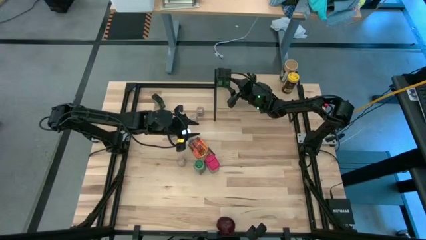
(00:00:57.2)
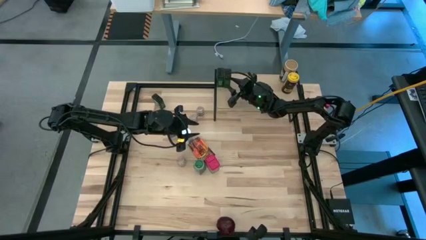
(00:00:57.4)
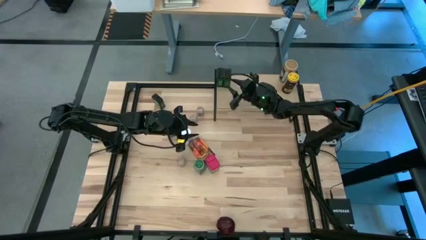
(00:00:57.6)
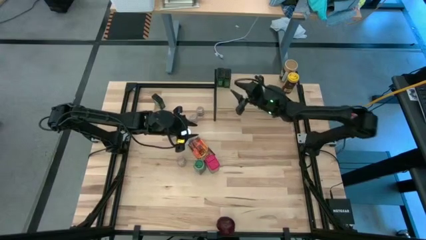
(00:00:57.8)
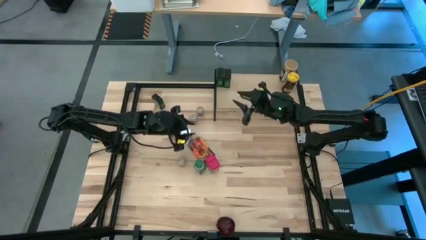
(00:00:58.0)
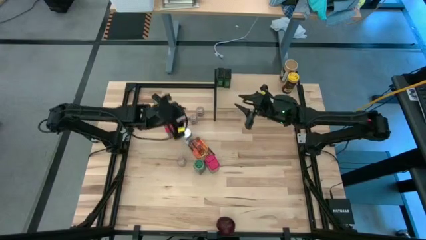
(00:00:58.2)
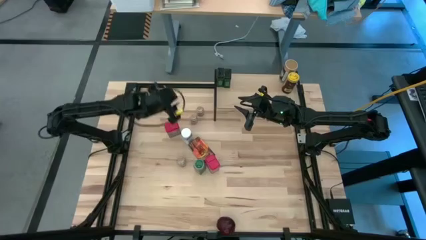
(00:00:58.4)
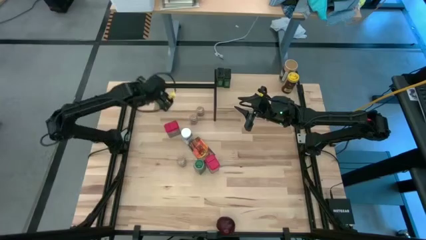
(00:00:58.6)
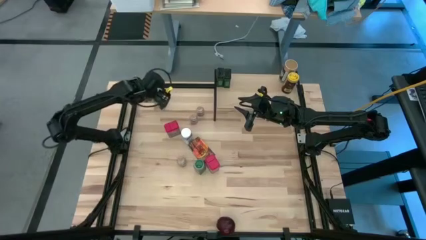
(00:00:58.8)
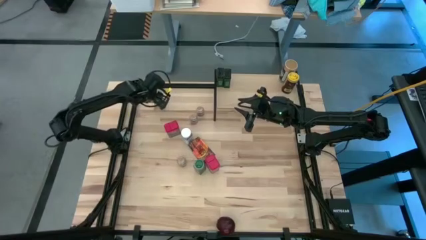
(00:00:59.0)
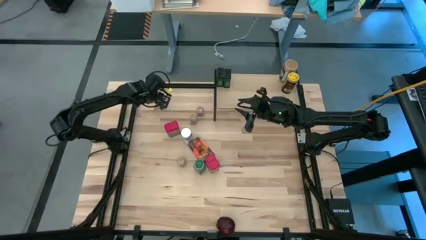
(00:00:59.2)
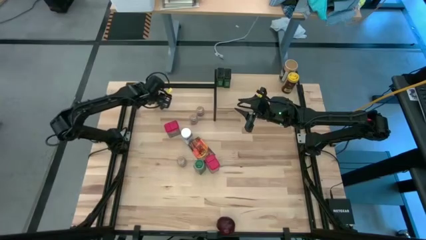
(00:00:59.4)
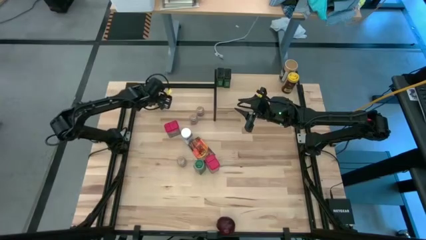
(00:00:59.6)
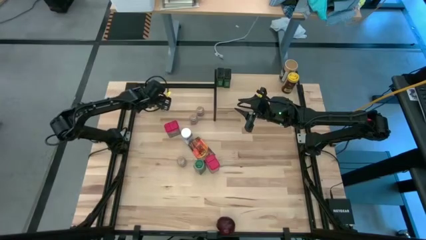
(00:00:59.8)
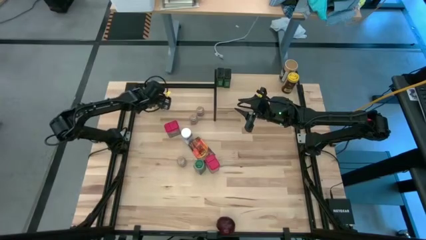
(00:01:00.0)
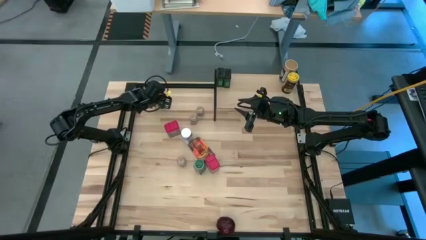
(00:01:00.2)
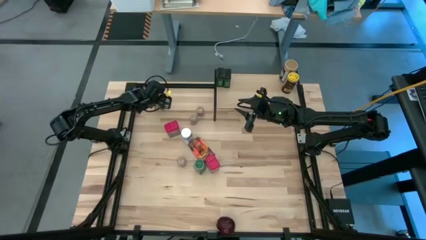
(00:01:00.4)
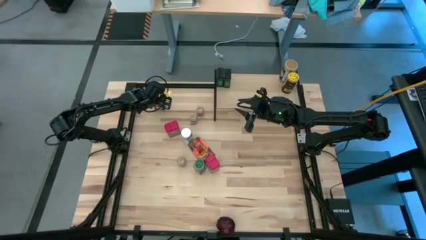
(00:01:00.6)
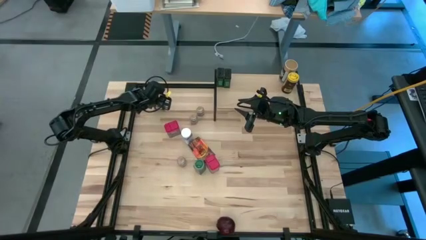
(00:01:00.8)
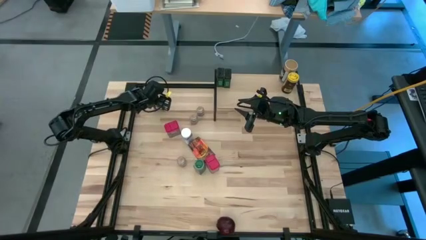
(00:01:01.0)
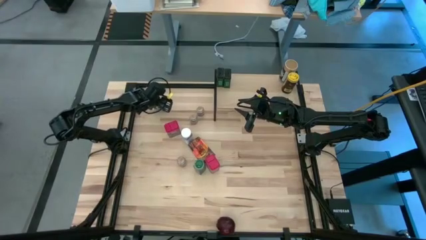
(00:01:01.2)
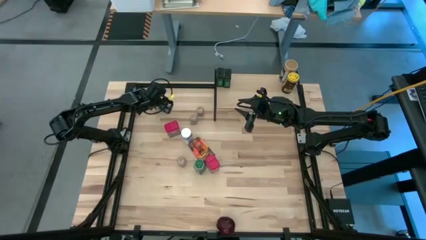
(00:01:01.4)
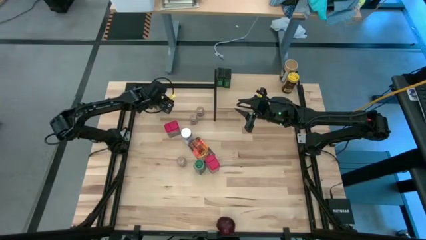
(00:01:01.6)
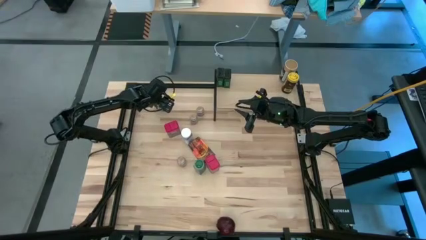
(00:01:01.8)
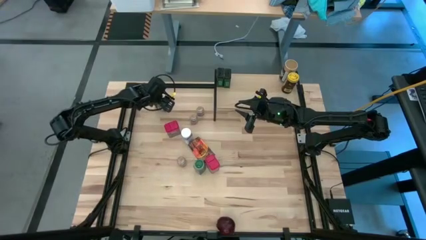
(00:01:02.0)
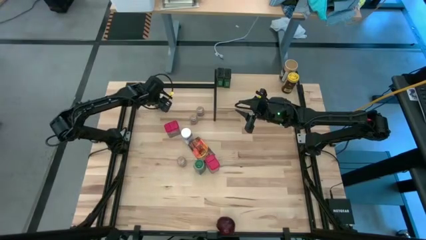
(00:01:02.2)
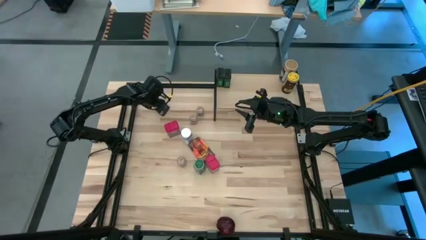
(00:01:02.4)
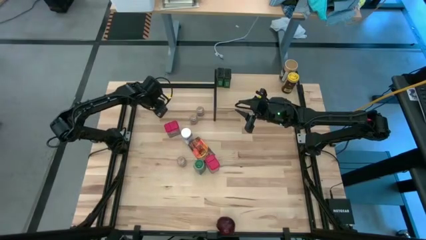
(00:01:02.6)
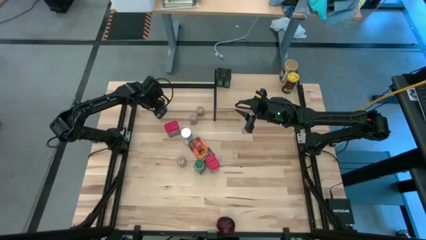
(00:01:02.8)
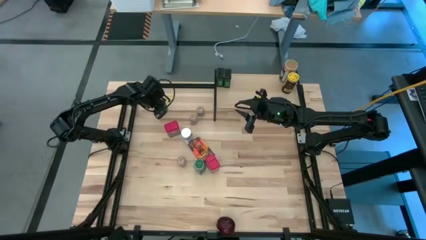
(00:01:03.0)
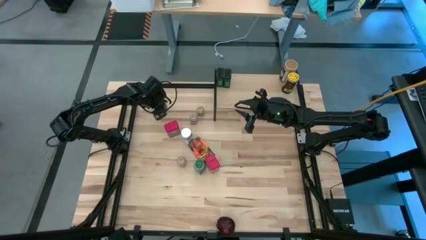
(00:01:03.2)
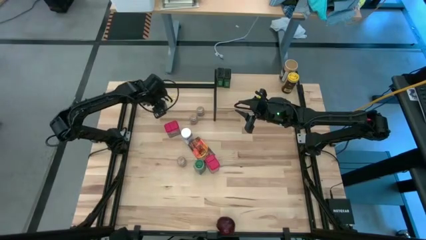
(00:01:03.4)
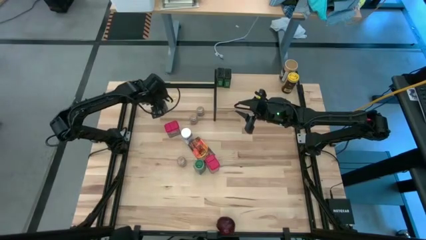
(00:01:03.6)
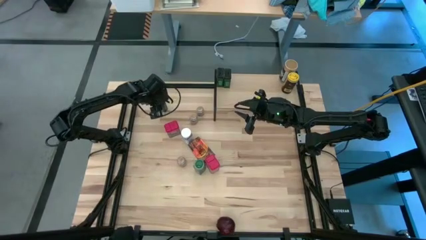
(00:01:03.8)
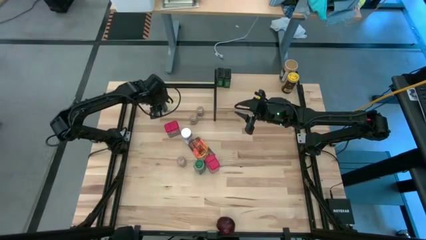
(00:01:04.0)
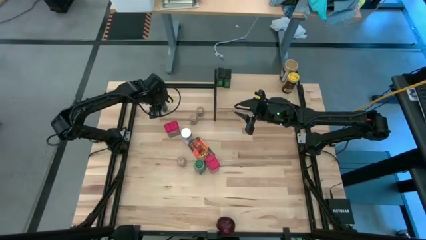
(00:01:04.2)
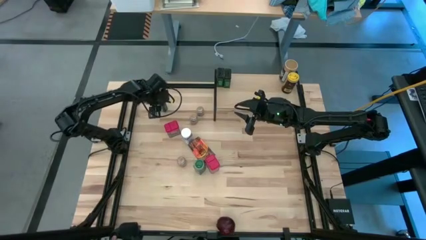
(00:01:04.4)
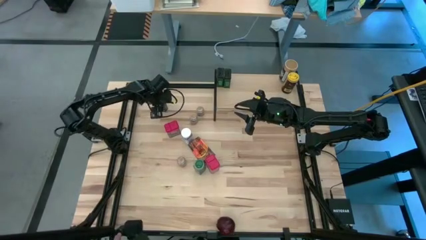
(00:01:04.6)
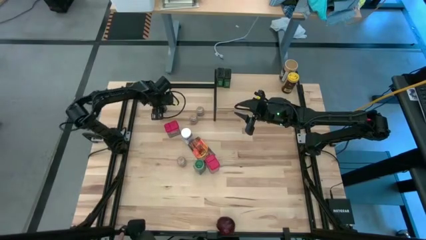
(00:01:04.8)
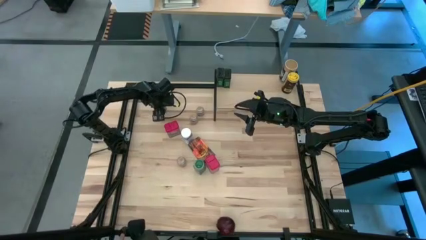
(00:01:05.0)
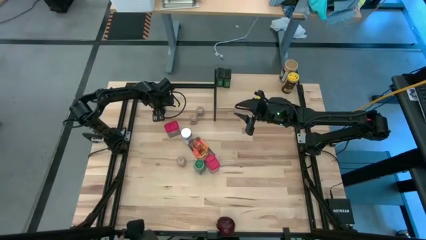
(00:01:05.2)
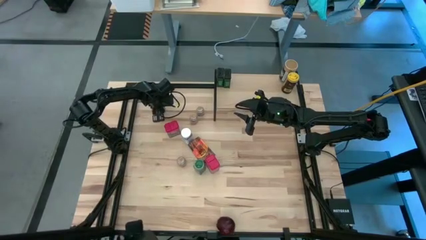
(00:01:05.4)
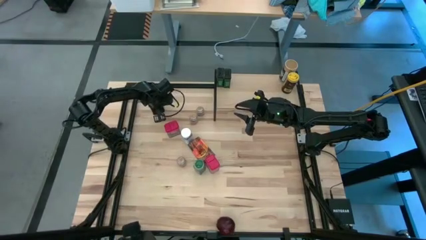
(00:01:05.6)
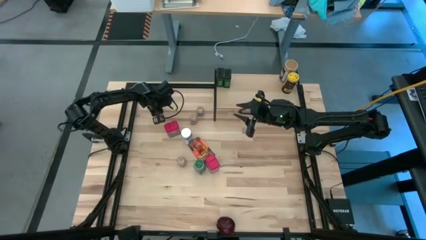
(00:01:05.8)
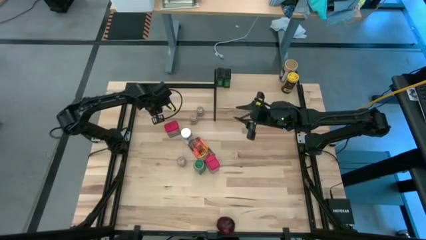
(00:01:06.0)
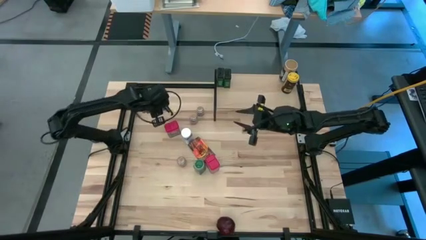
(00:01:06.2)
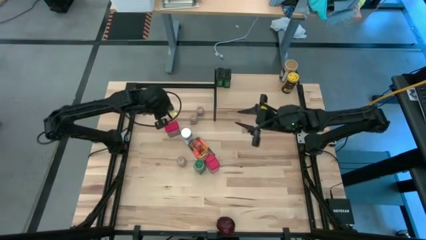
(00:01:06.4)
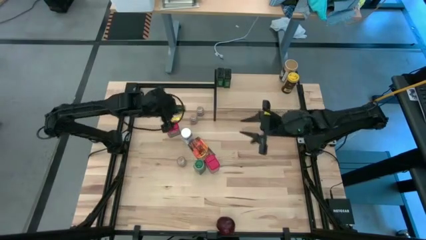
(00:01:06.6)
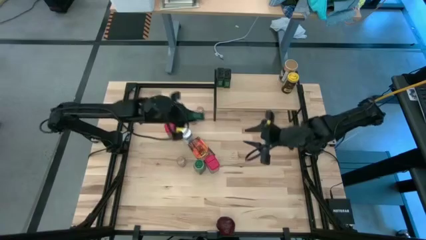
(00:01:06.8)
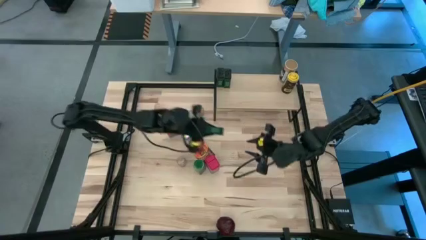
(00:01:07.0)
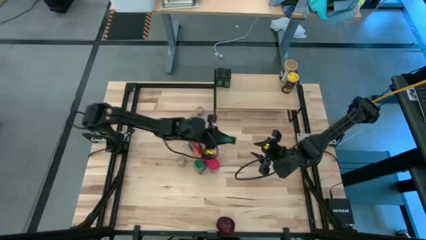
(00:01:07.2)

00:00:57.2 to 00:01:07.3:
Task: Shelf spices
Put the green seasoning can on the shelf
